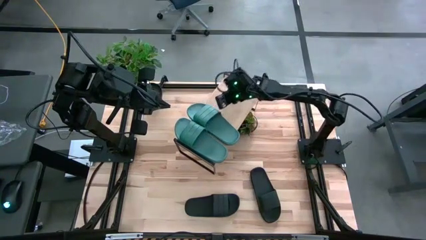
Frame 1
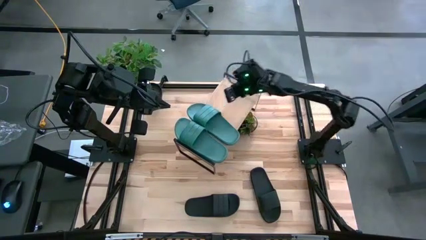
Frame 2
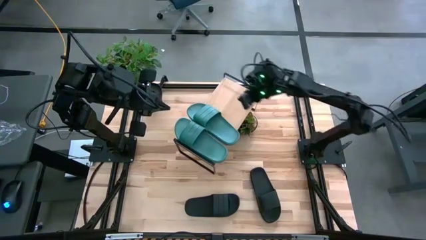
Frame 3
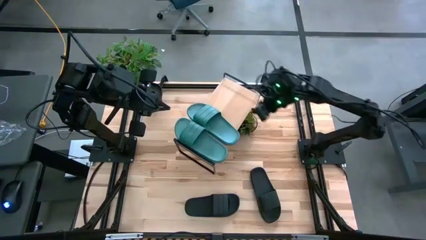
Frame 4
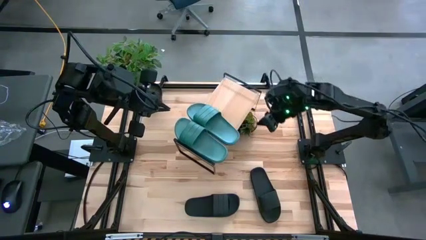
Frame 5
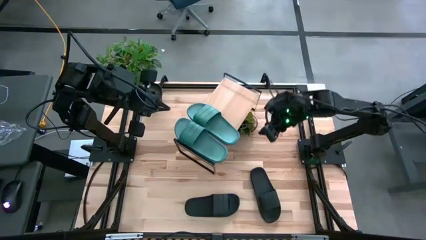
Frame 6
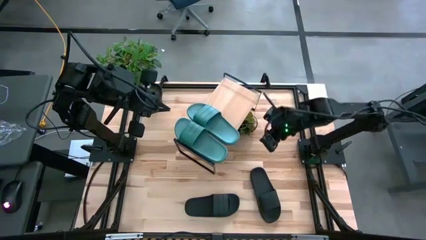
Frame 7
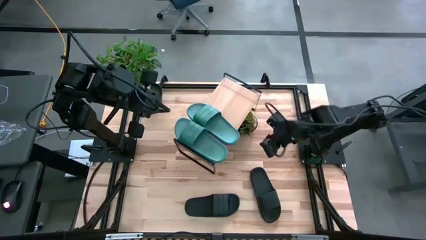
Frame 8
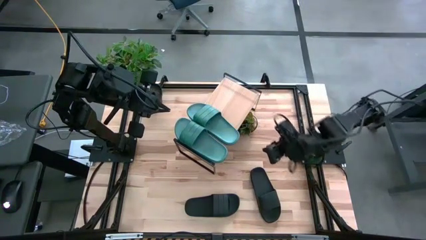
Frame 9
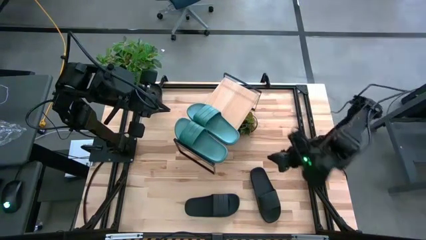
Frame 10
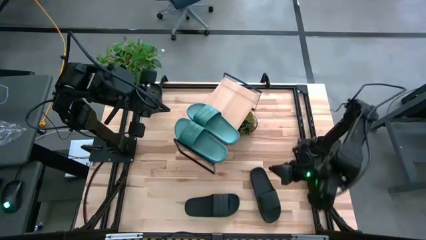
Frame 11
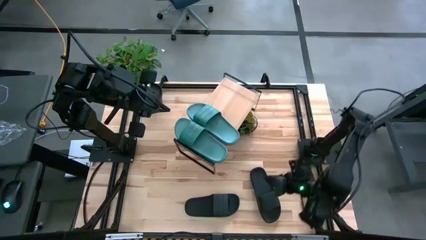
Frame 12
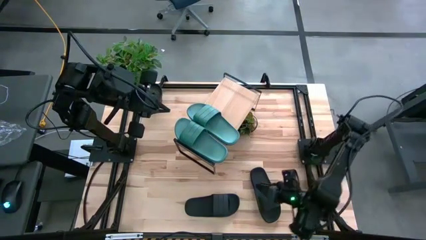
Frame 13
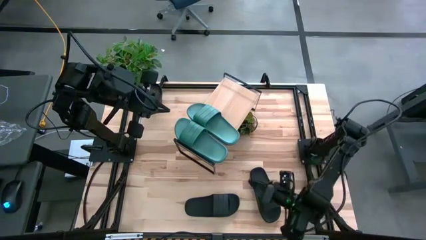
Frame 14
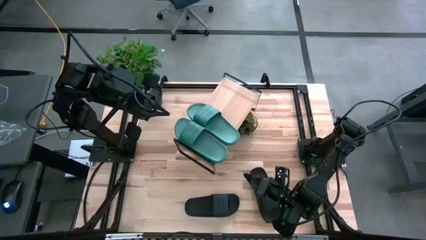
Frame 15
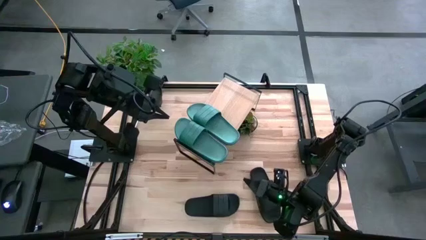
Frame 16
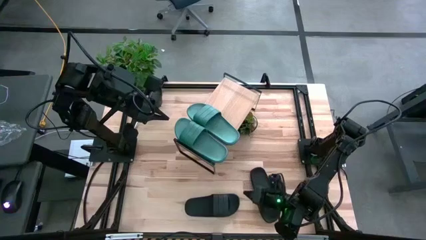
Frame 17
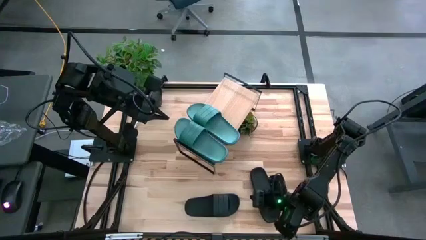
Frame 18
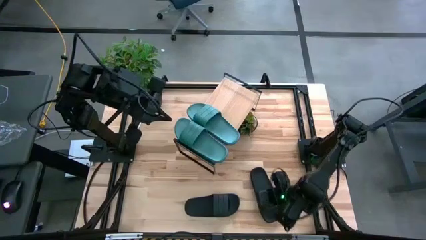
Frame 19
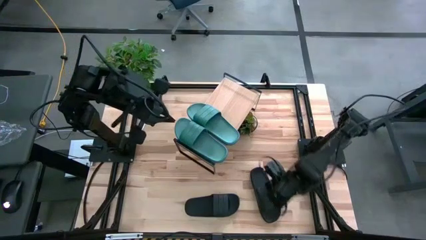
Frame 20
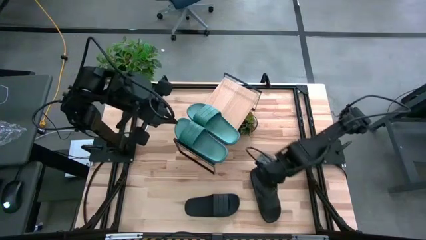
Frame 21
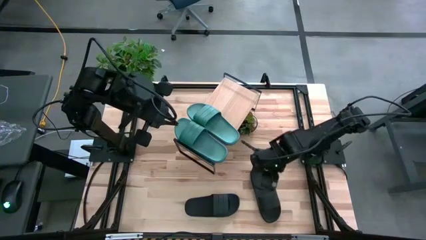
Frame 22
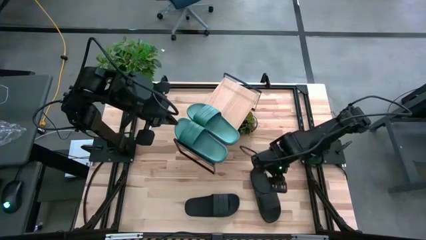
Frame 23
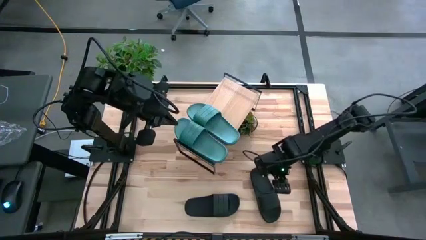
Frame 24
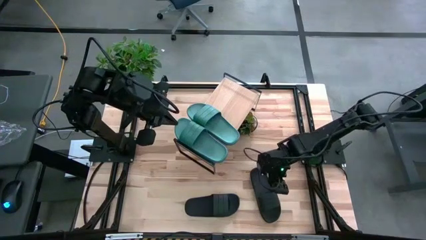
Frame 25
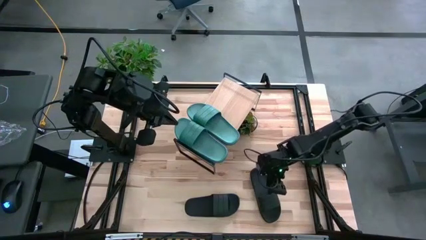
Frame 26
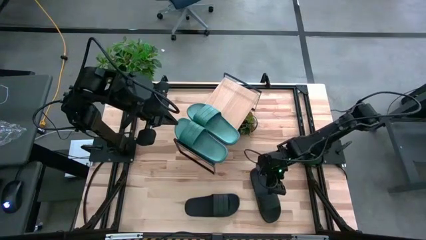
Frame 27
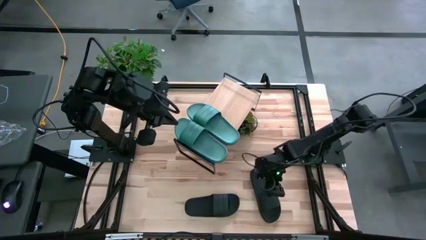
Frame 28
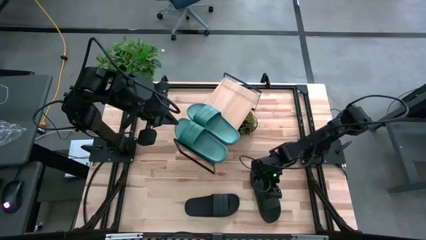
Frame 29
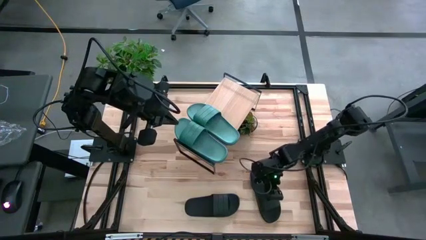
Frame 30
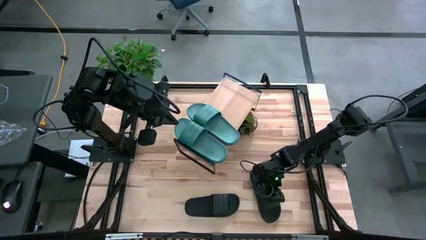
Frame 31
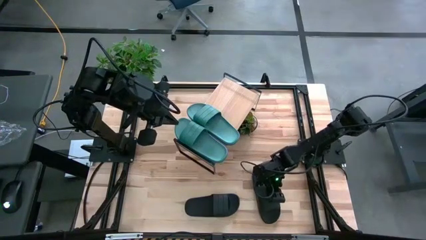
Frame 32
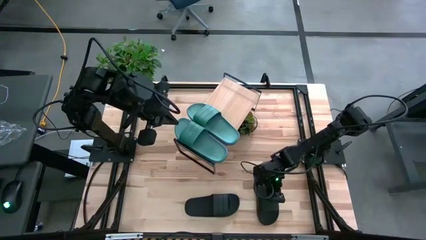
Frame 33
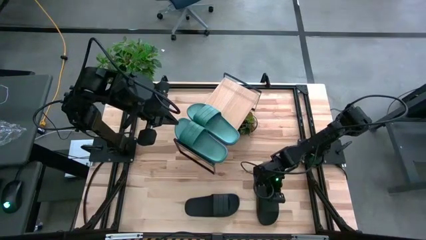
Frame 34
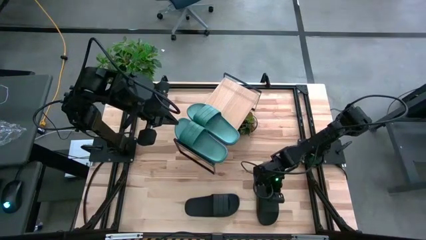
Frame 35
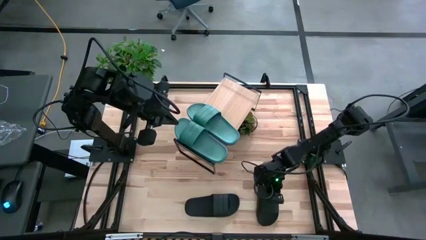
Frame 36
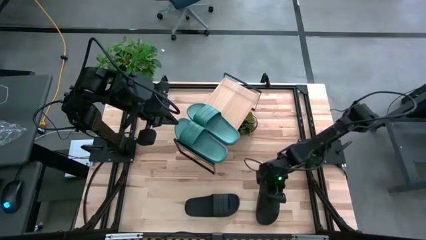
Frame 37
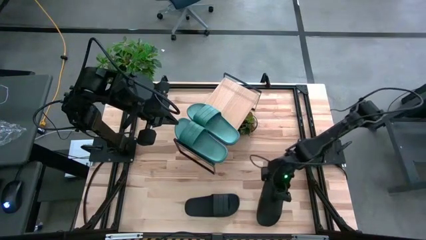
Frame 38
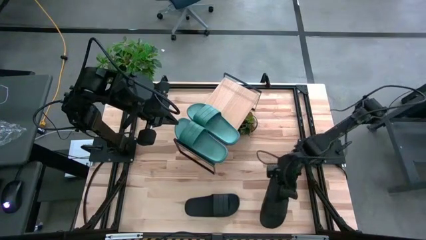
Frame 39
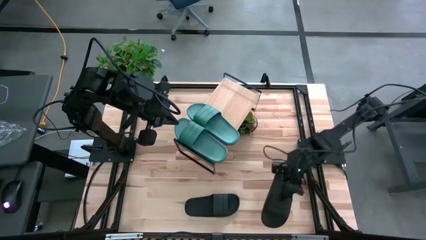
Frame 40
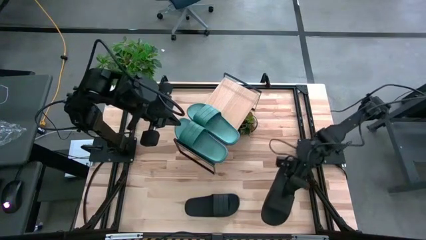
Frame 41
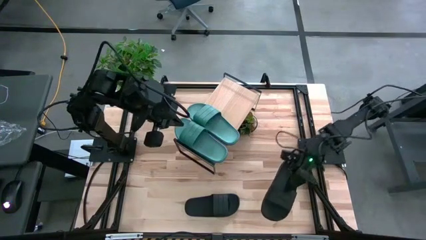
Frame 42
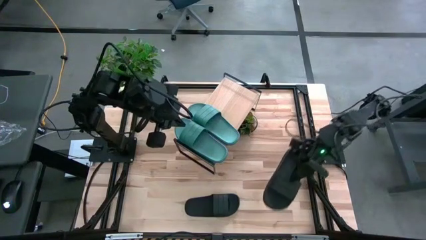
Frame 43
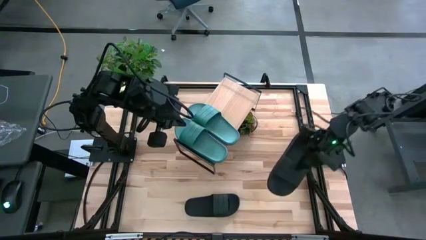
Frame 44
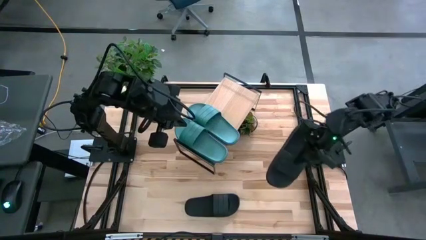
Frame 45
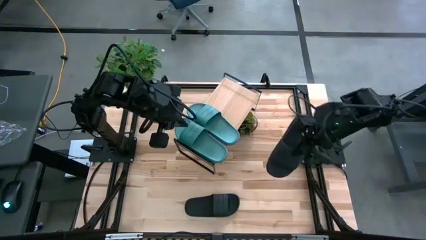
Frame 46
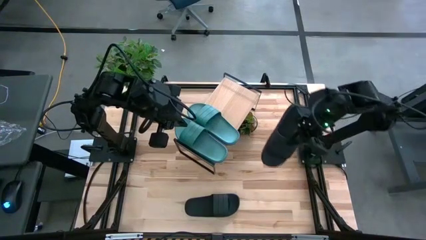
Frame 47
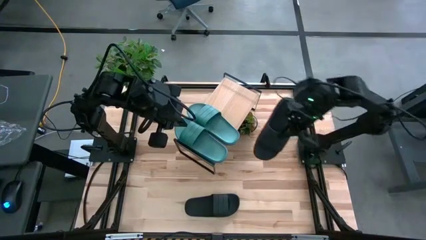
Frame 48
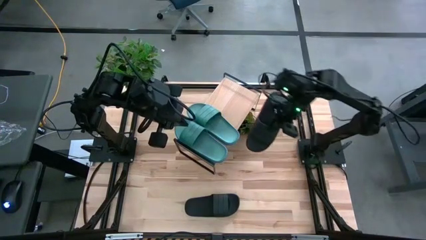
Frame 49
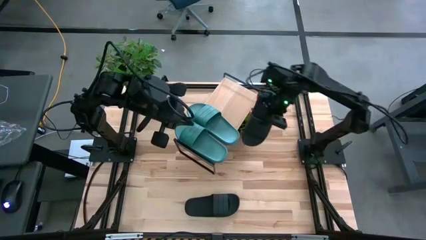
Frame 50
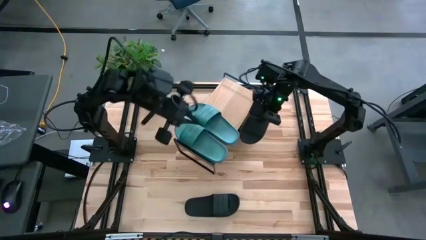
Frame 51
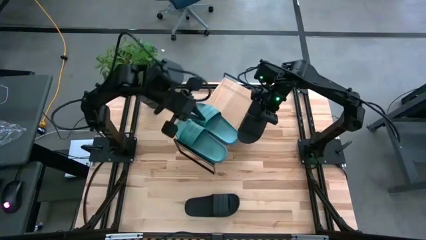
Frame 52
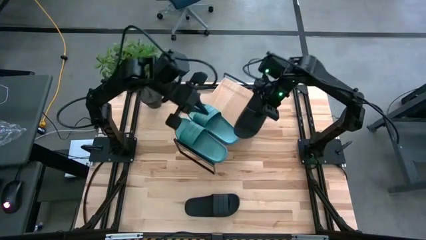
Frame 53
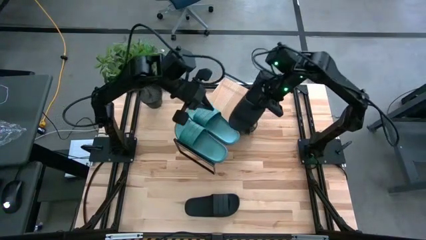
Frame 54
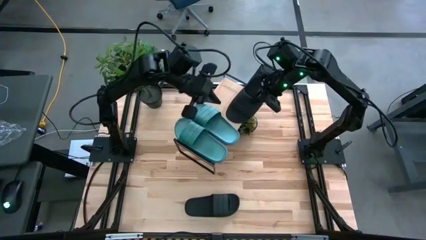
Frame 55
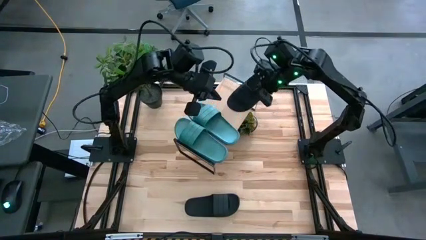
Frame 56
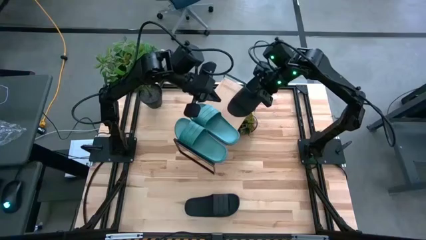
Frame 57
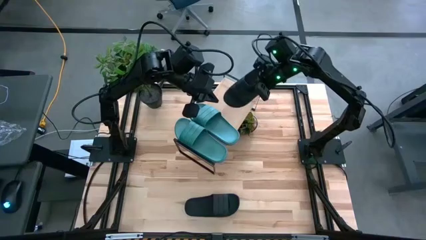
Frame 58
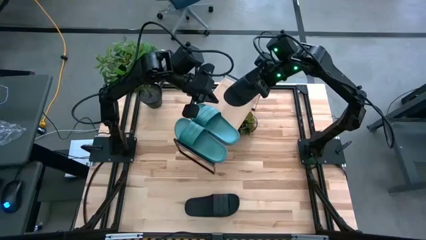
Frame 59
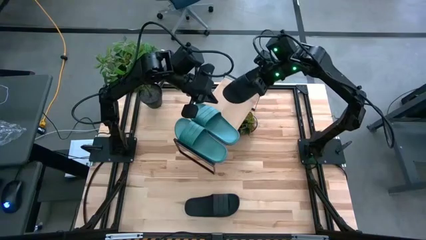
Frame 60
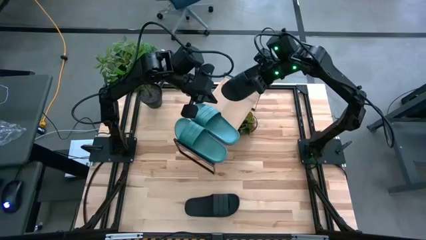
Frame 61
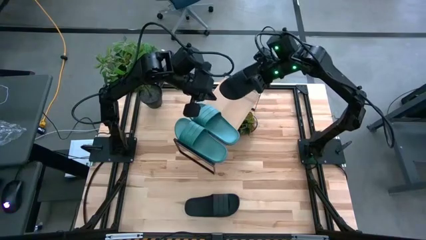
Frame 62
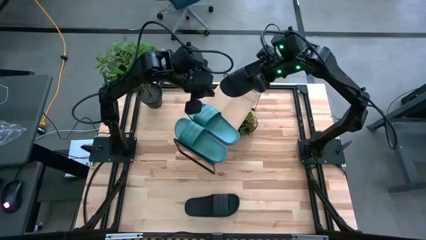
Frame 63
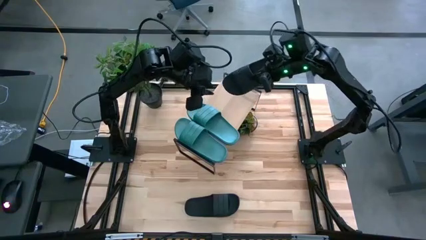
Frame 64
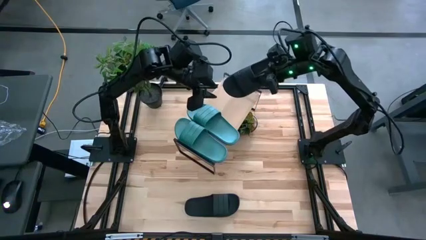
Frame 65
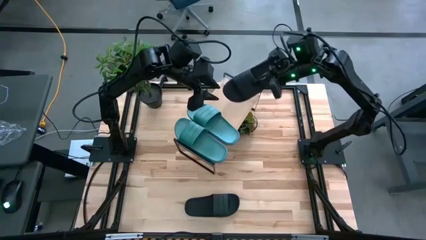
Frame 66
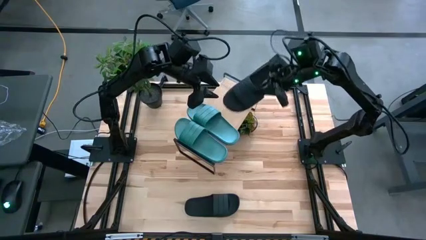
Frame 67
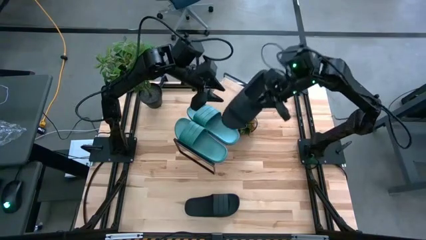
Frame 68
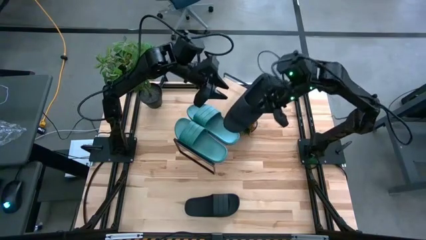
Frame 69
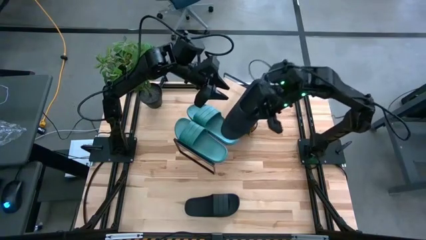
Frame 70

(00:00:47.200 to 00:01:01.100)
Task: Pick and place slides into the shelf
Put the right black slide on the shelf
